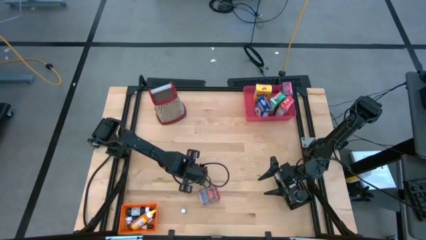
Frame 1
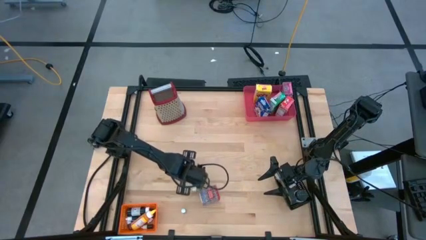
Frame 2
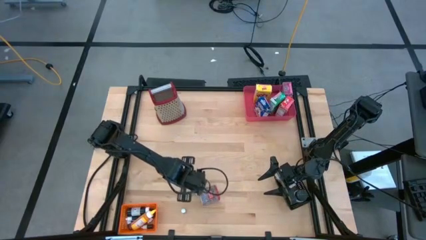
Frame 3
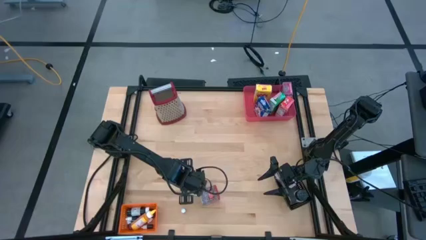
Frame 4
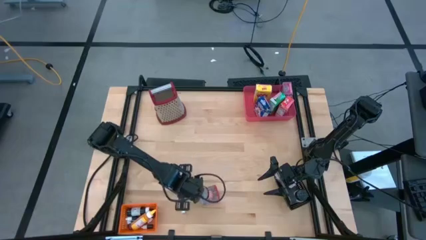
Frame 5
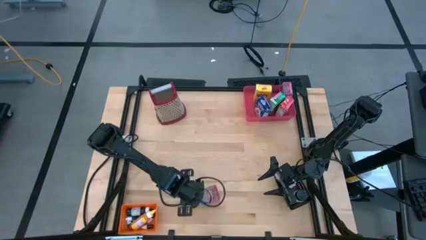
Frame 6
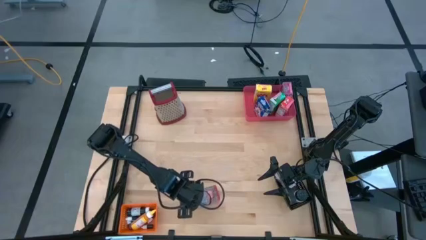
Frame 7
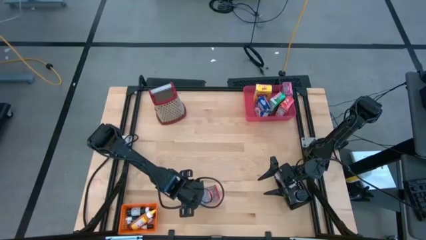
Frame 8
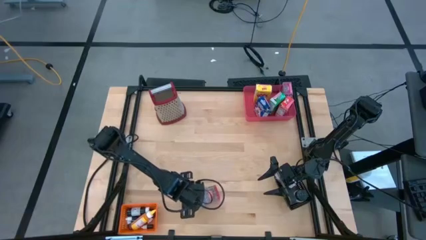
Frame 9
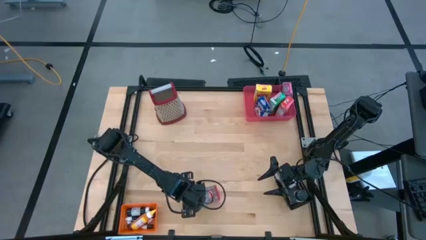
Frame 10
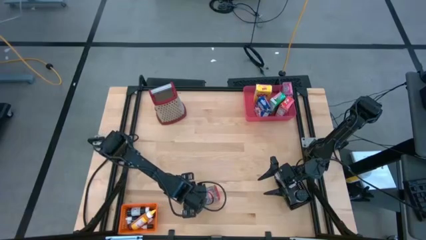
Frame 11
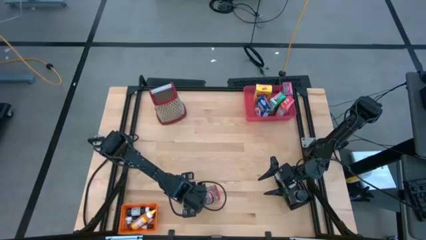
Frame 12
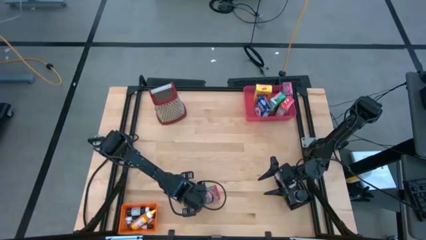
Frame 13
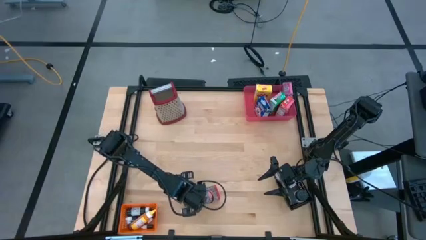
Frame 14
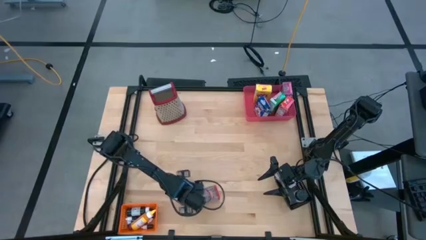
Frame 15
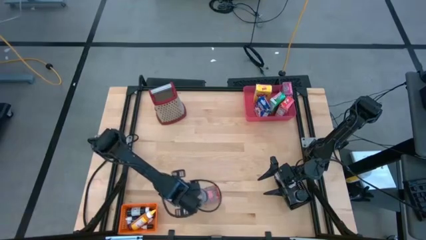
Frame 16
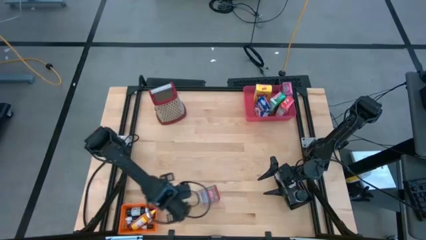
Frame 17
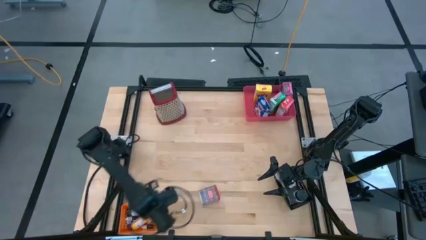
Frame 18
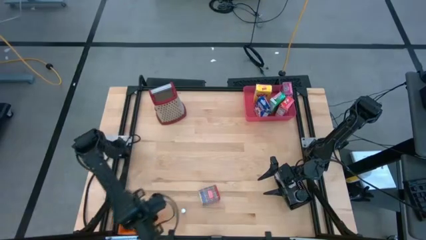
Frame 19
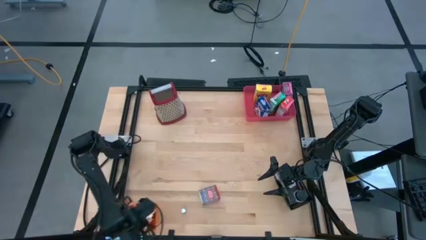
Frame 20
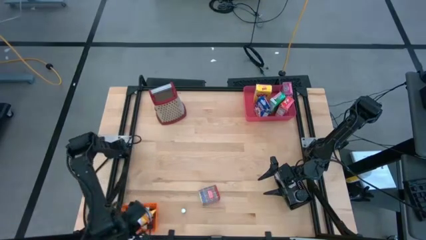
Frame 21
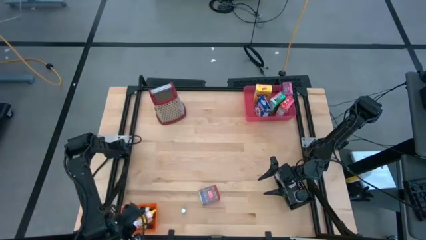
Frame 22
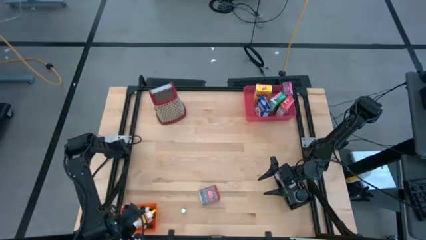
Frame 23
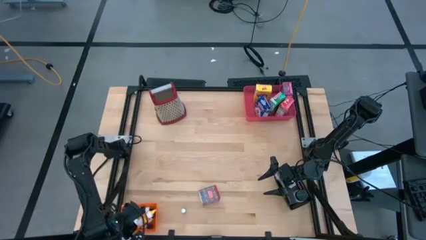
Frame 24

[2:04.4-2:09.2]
Task: Pick & Place Kitchen Items
Put the small black food coloring bottle into the orange bin

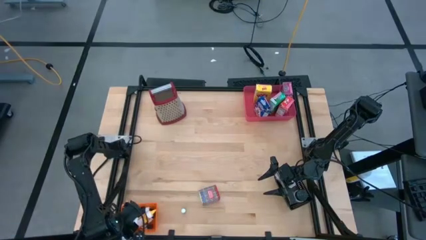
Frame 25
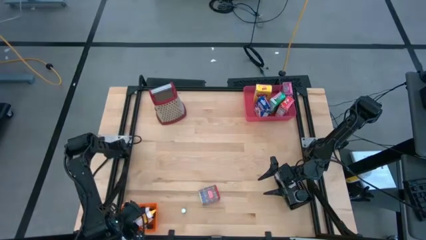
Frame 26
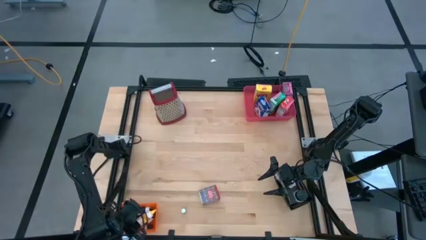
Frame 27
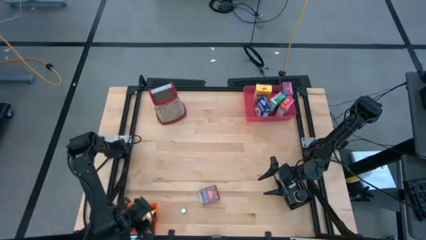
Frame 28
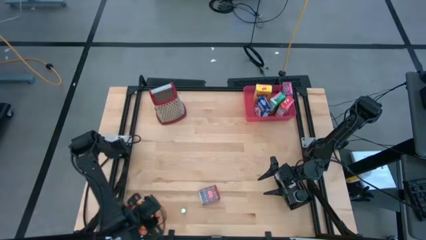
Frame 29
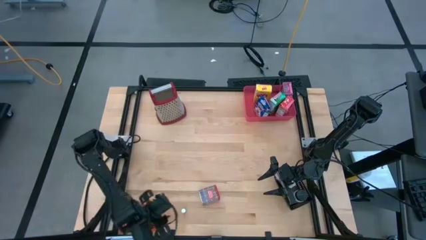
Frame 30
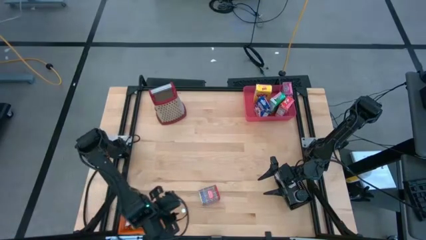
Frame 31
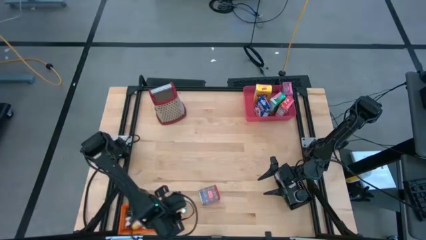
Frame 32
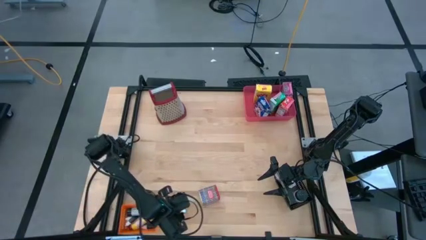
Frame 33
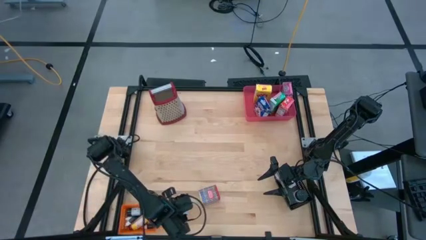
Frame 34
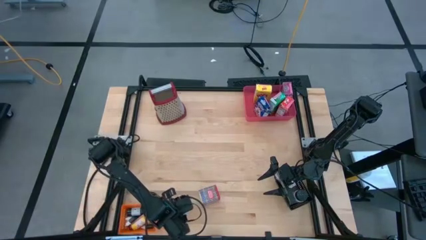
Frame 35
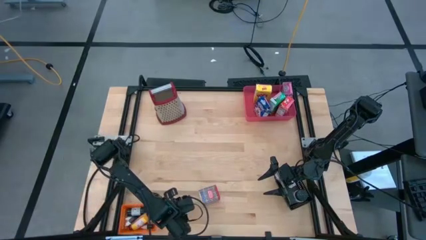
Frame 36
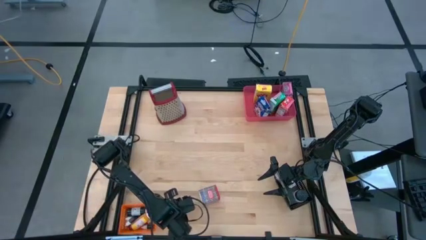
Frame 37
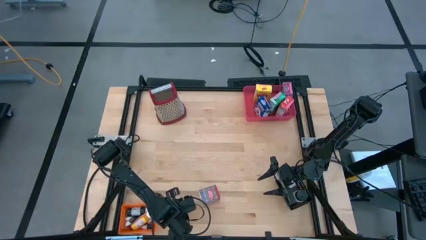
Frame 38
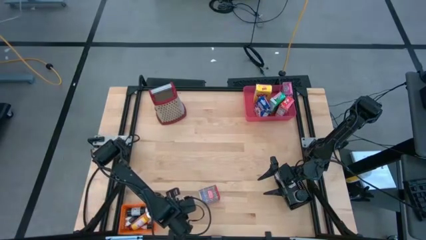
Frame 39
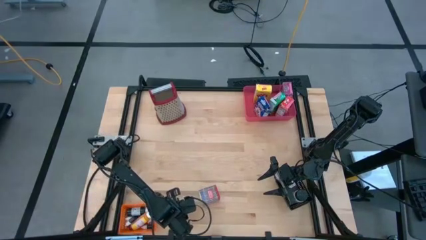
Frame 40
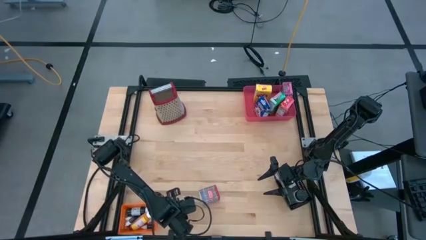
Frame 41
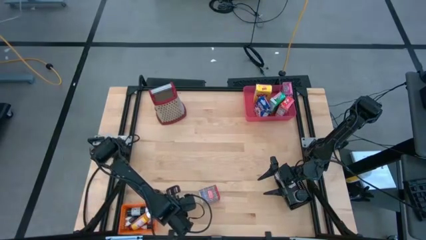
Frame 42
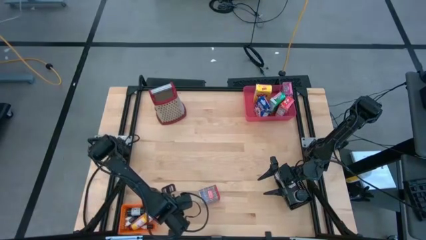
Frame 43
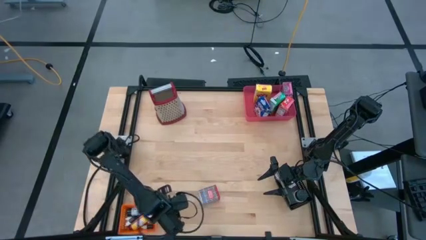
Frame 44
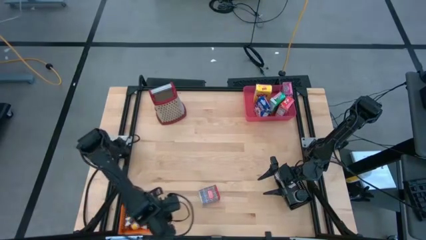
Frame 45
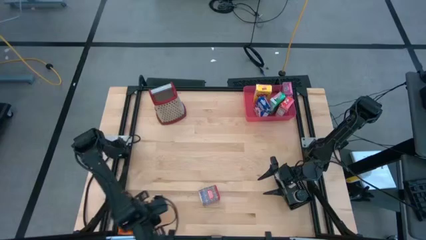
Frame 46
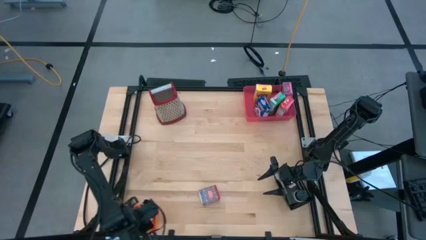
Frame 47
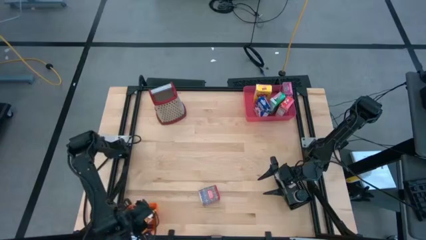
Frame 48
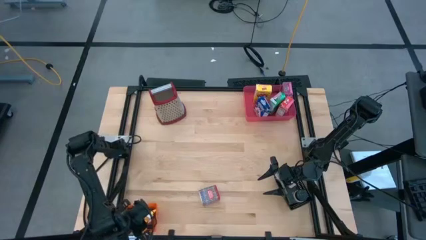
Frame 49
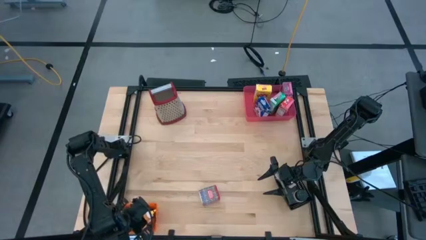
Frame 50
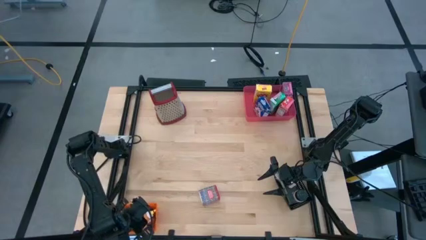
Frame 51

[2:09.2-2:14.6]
Put the small black food coloring bottle into the orange bin

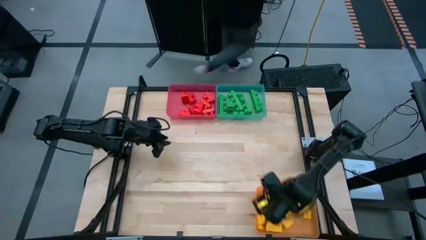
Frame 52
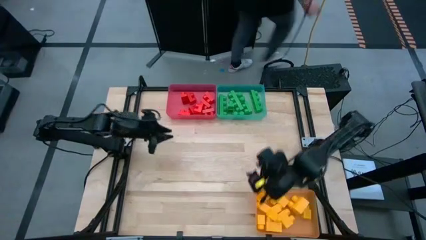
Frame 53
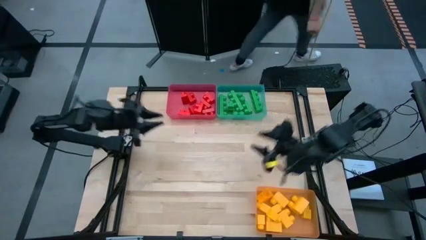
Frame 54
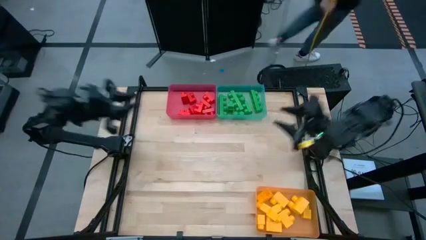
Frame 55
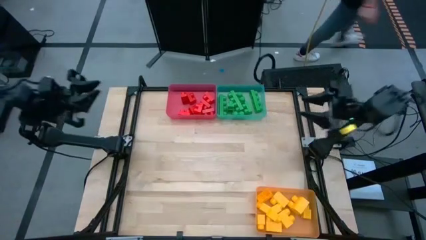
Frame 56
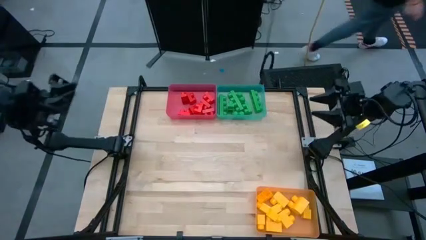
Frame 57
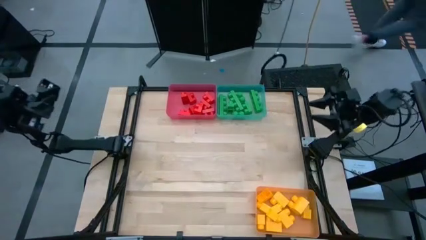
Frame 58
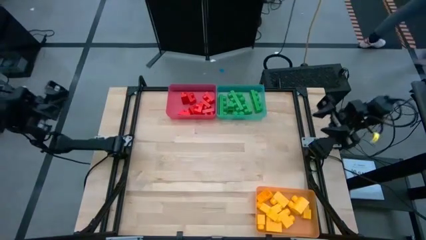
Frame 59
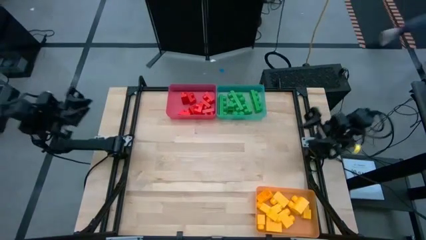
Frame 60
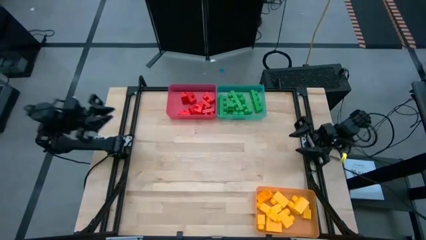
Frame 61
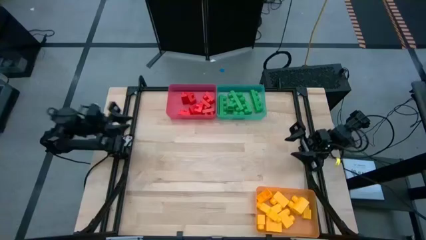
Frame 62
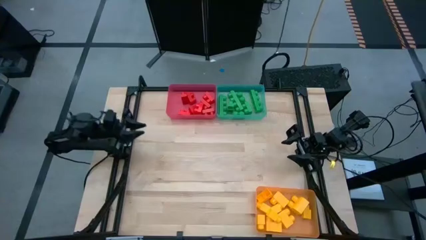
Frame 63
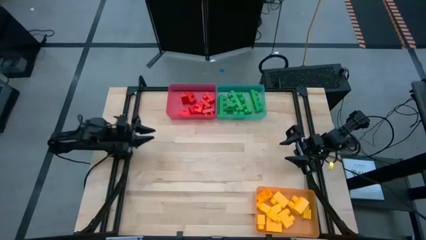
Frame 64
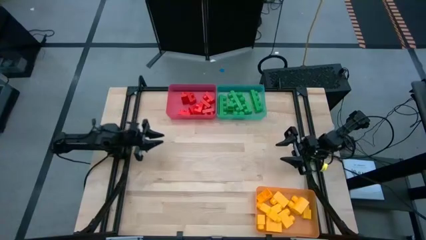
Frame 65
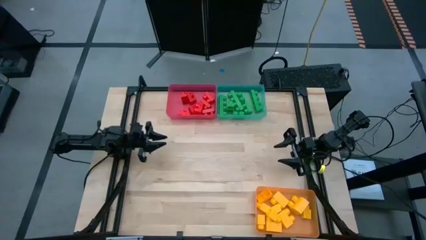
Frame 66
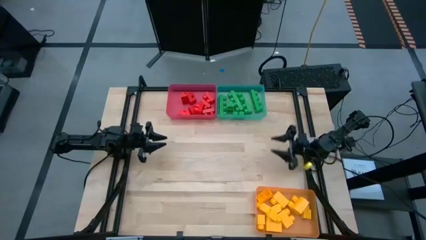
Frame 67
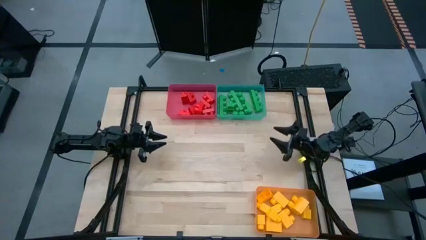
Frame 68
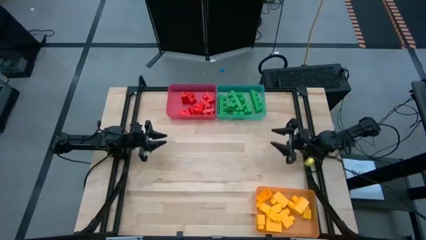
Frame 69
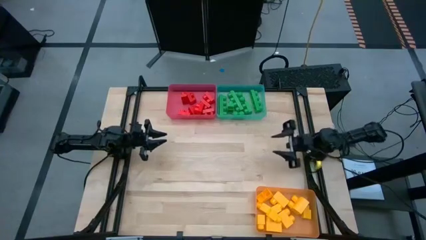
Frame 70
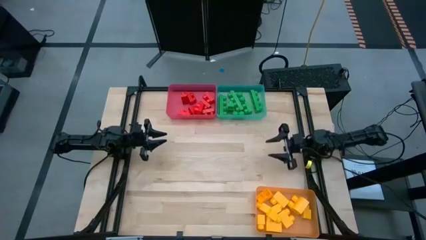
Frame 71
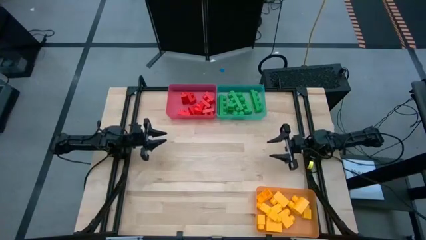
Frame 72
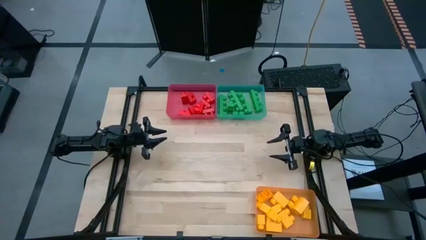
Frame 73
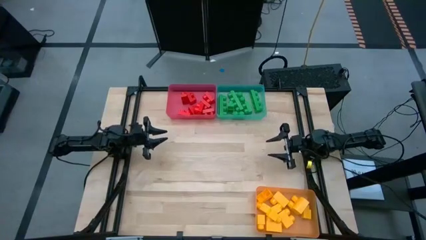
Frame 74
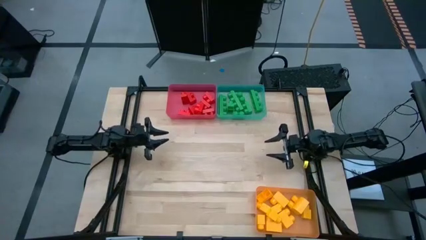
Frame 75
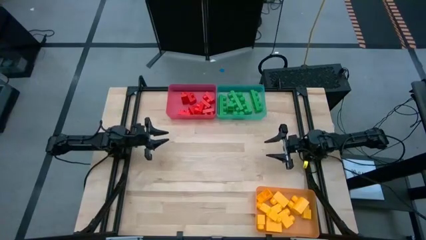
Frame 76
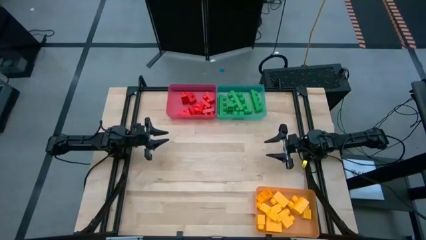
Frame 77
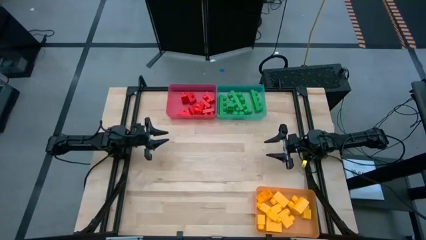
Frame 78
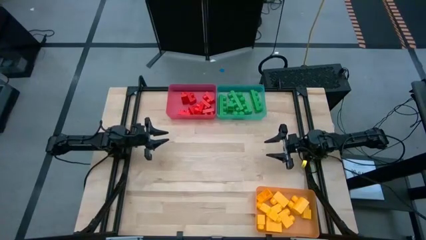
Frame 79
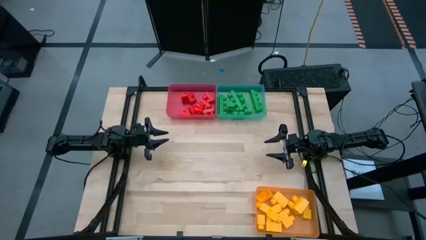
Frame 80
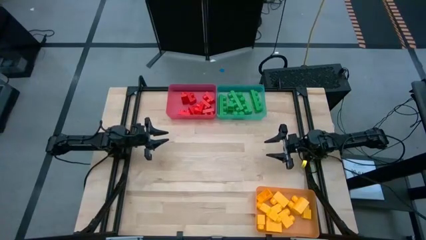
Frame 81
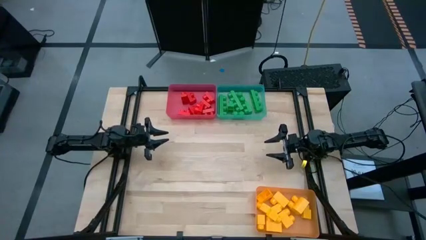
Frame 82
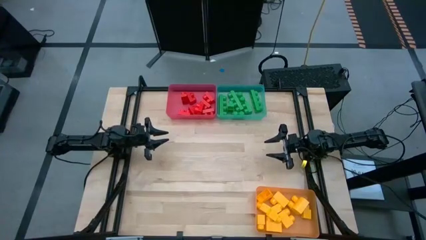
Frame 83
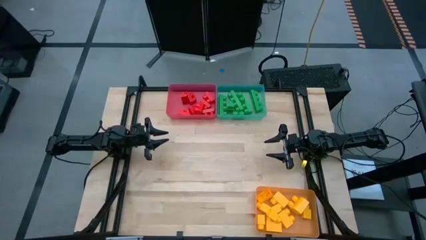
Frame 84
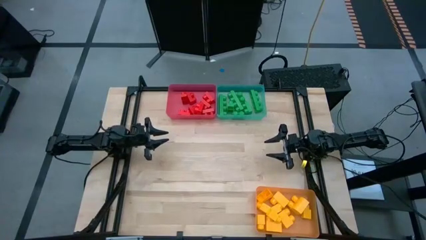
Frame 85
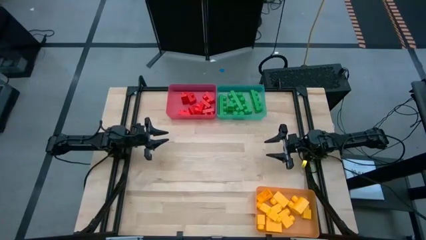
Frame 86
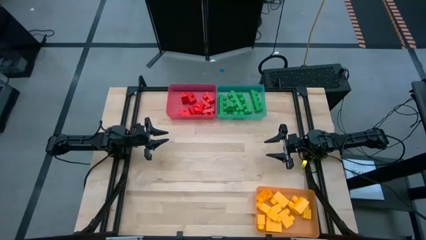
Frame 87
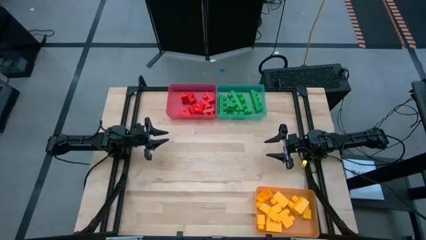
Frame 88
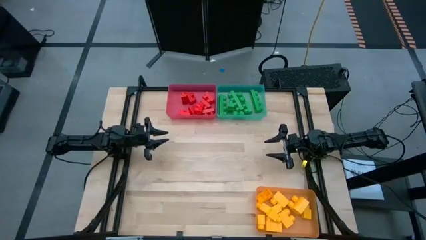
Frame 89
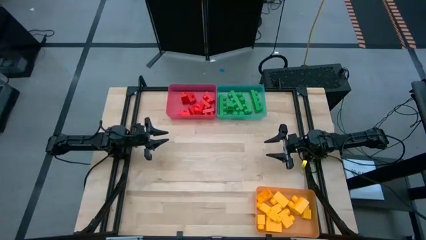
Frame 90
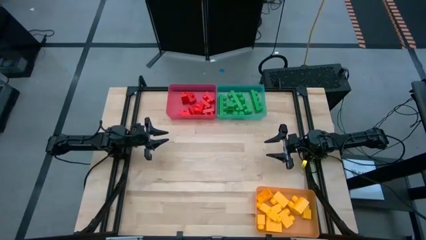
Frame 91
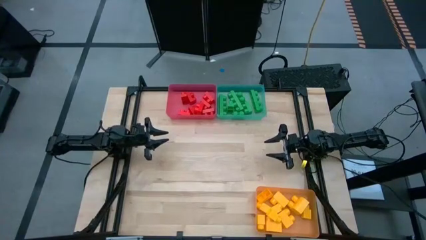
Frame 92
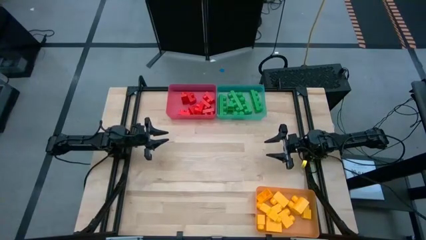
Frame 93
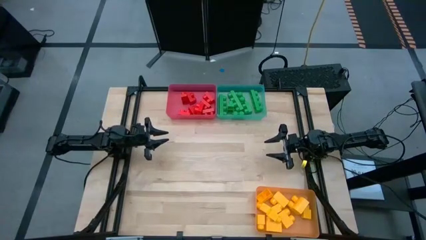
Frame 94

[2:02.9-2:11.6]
Task: Sort blocks
Return to Home Position
